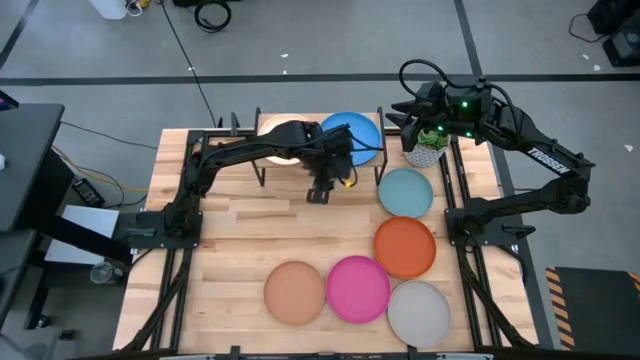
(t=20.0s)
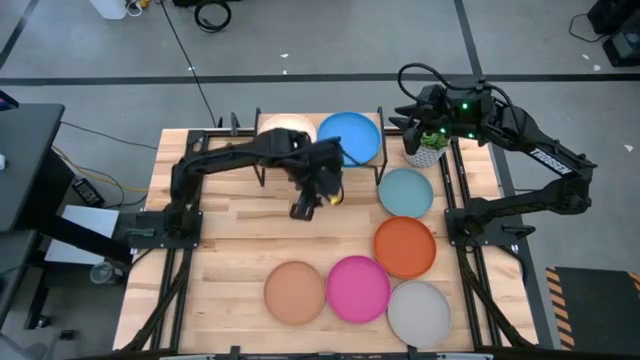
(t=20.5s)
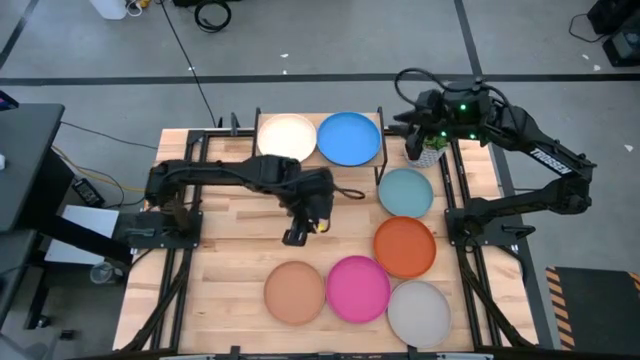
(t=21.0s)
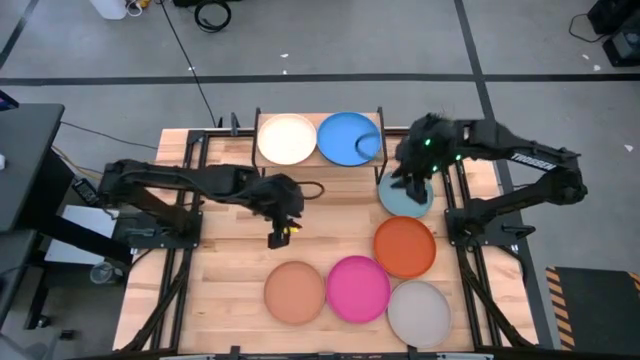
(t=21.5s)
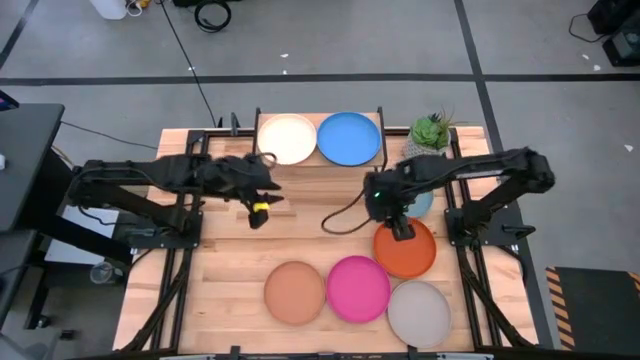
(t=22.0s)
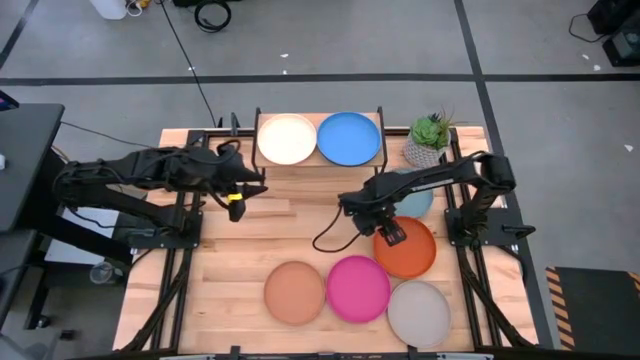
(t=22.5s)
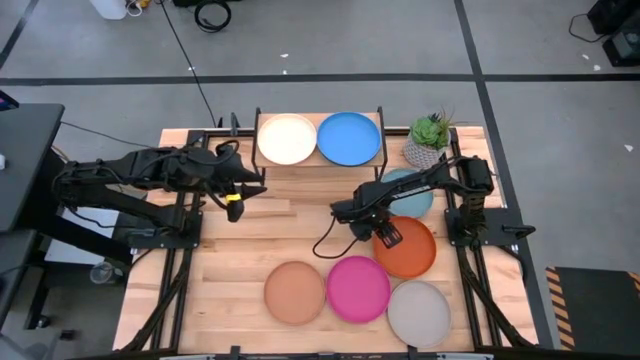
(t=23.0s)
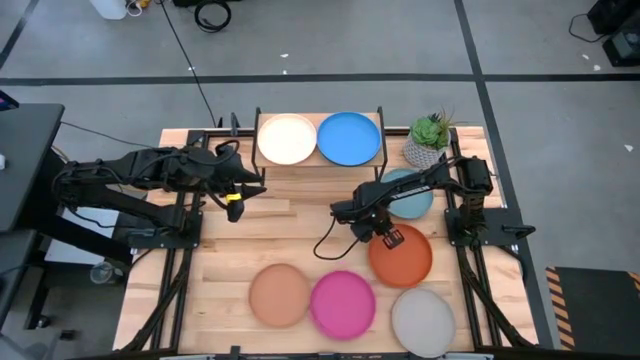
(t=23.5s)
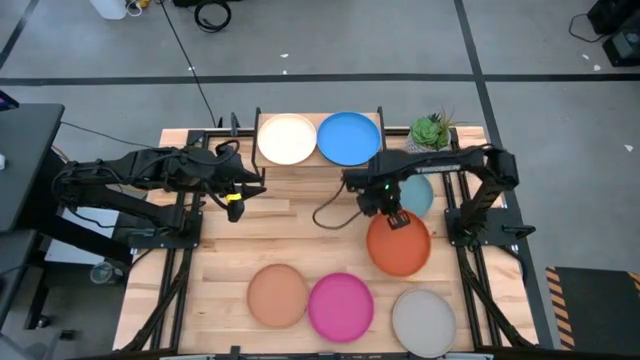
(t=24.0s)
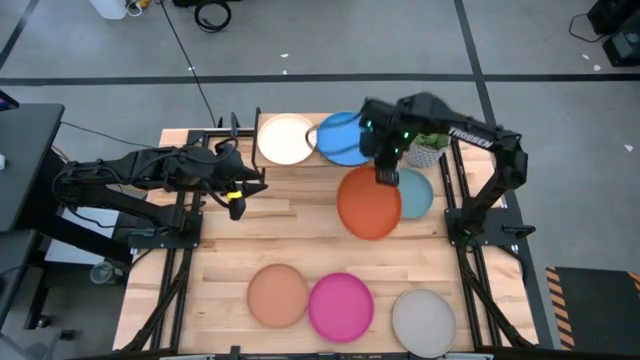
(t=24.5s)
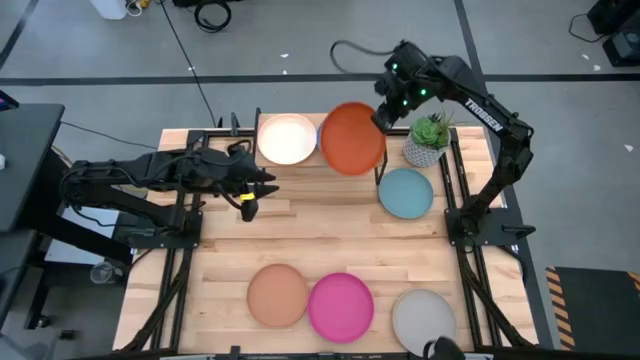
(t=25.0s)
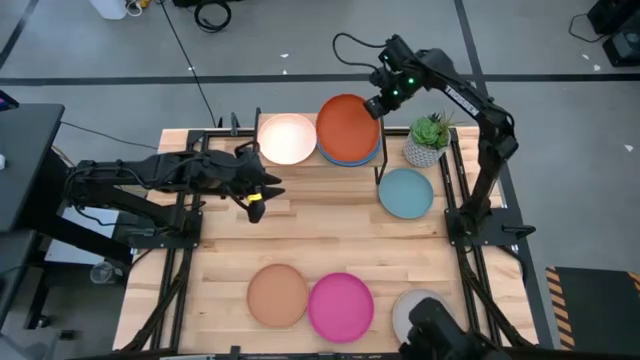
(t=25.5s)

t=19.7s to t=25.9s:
Task: Place and stack plates onto a shelf
Stack the orange plate on top of the blue plate on the shelf

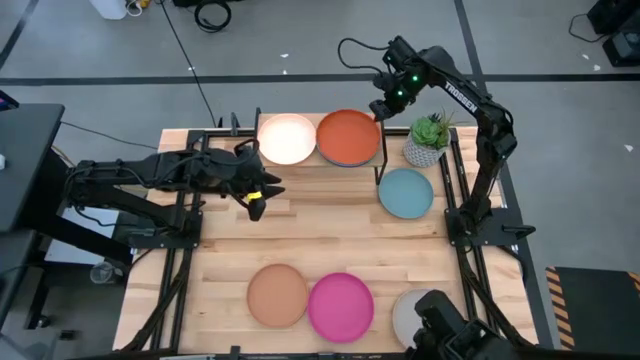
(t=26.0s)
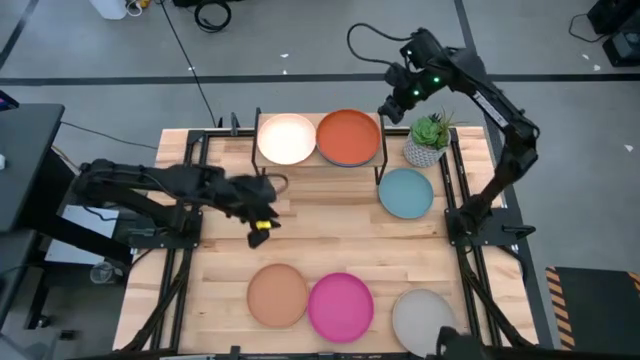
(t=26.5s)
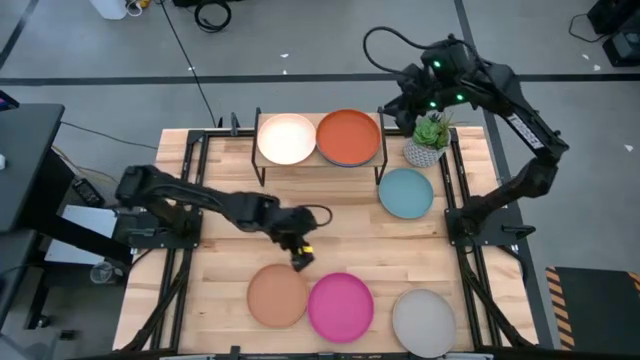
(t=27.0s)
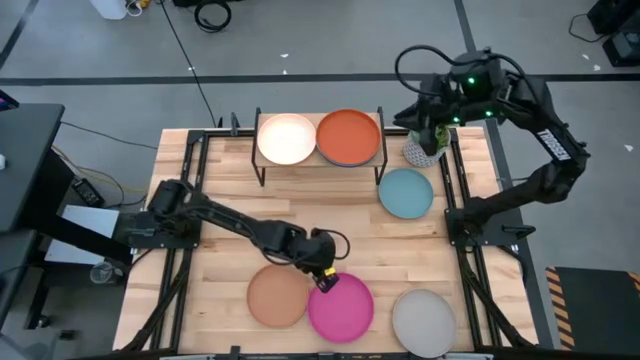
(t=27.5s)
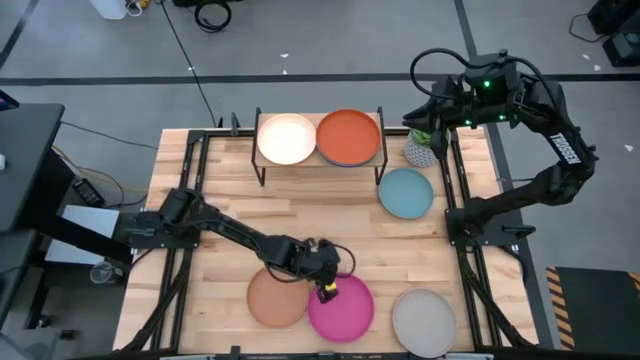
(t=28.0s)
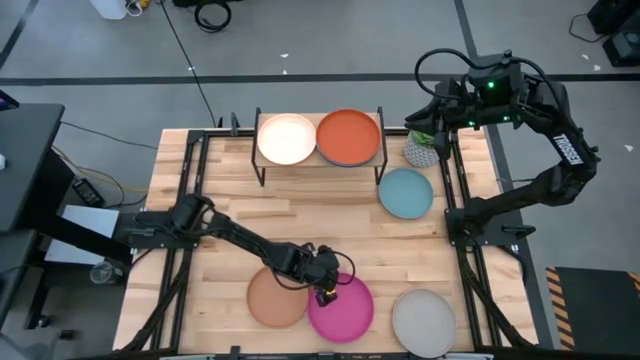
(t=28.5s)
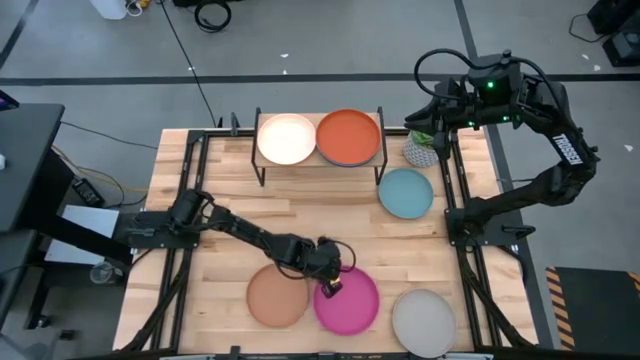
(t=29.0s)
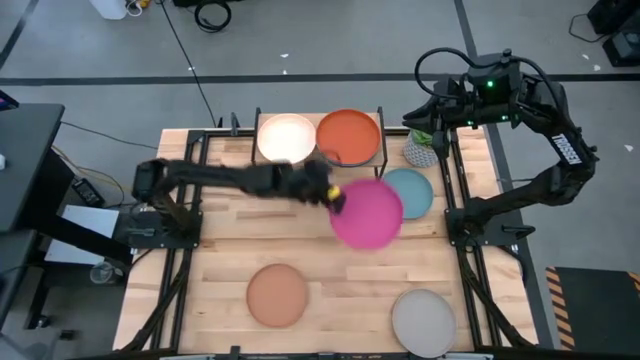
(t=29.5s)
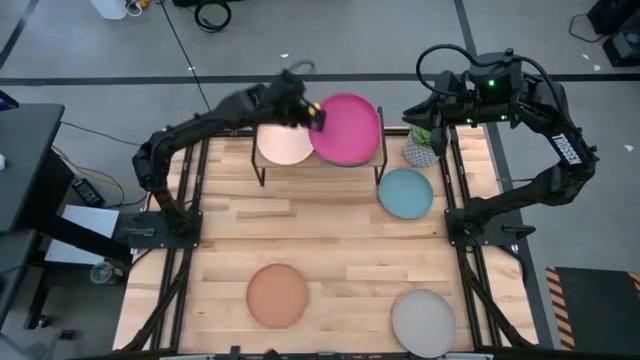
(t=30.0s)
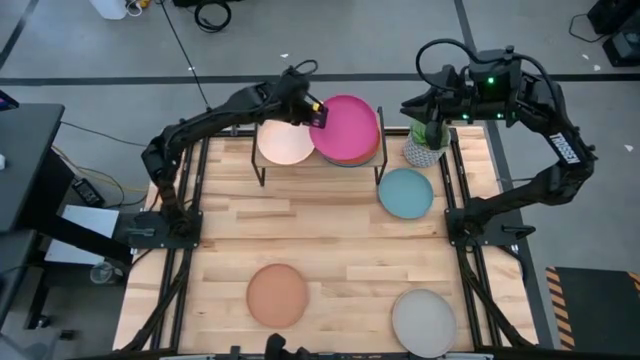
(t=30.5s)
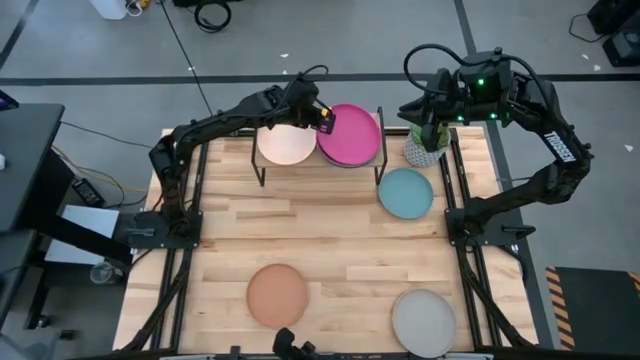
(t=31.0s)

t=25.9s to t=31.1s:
Stack the pink plate on top of the orange plate on the shelf

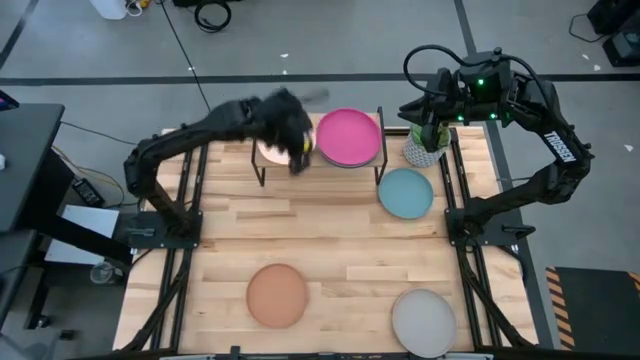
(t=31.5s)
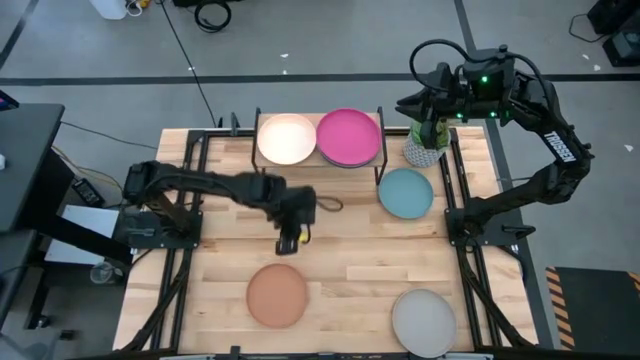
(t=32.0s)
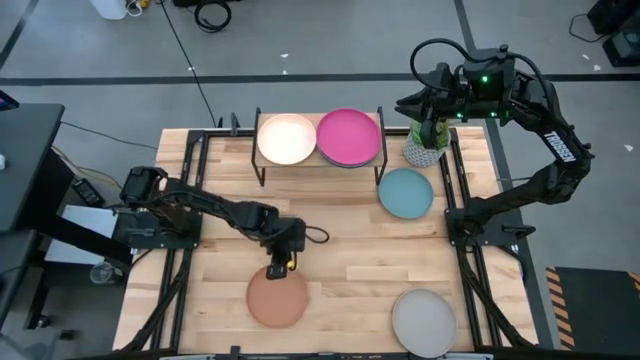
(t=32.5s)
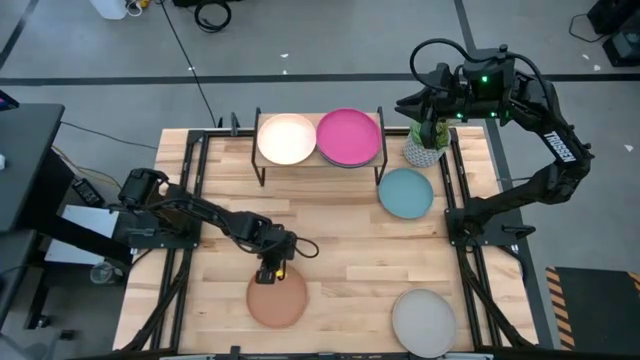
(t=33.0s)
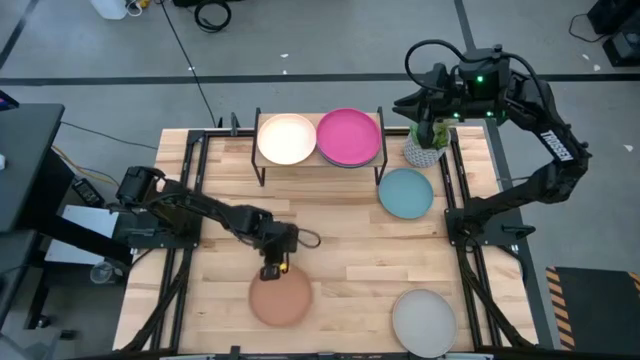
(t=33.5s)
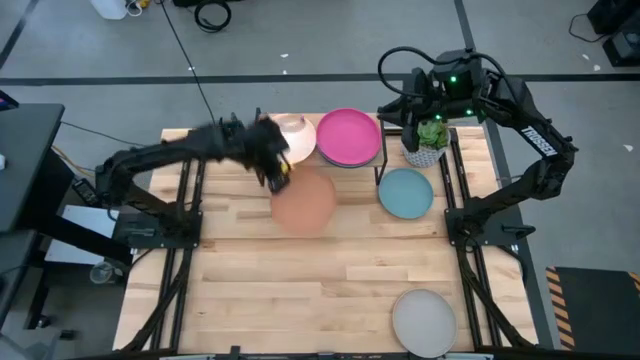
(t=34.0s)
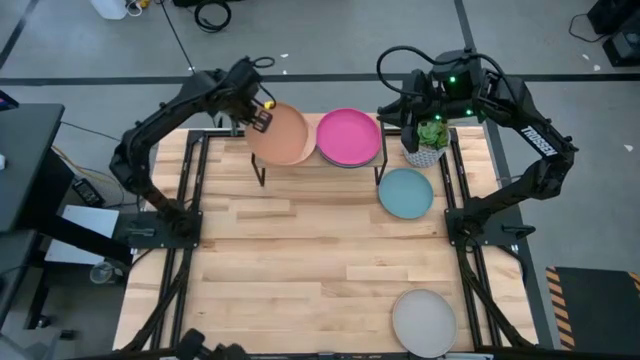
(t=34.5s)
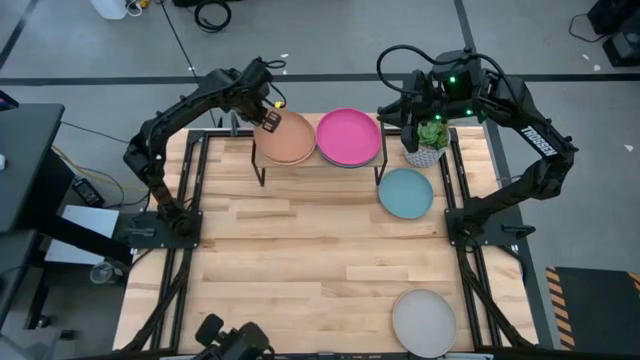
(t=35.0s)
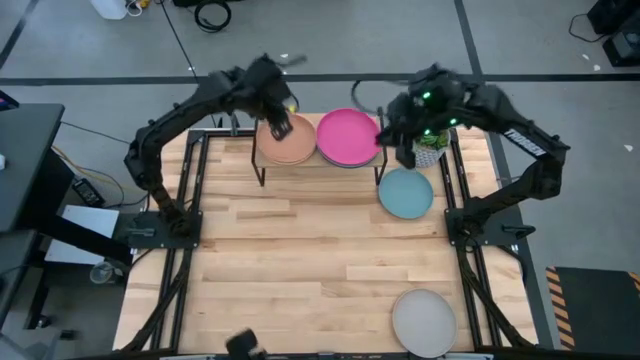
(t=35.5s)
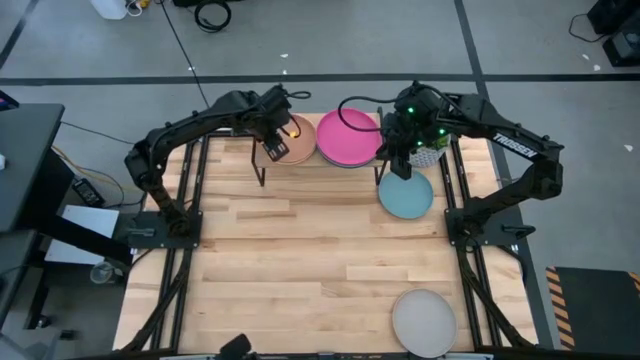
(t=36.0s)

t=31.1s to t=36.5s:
Stack the brown plate on top of the light pink plate on the shelf

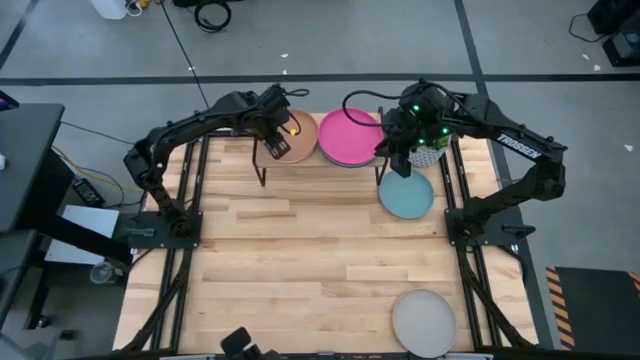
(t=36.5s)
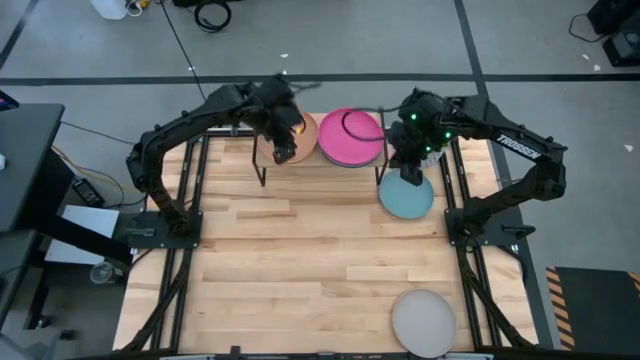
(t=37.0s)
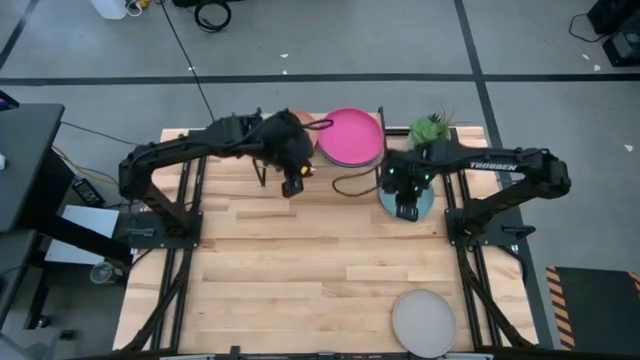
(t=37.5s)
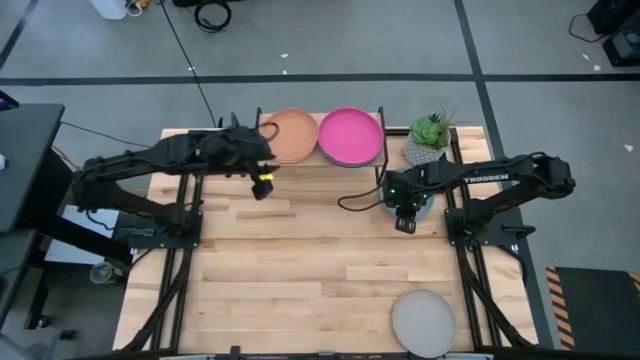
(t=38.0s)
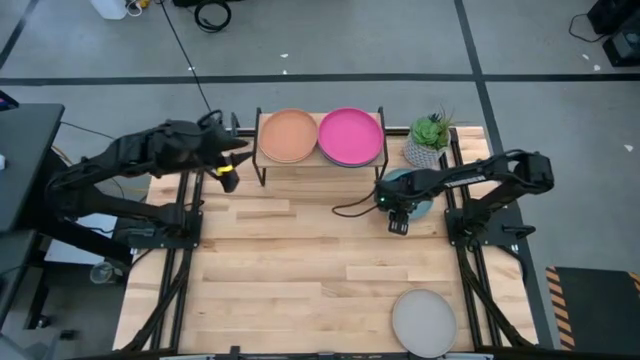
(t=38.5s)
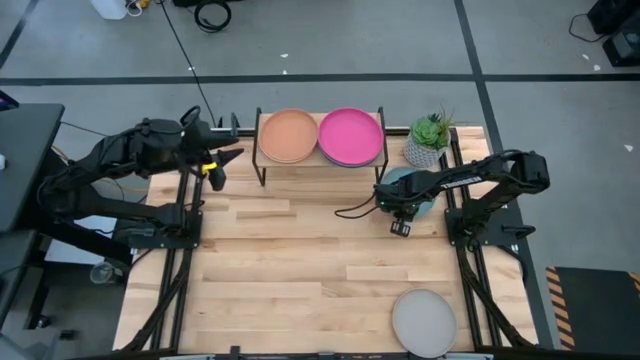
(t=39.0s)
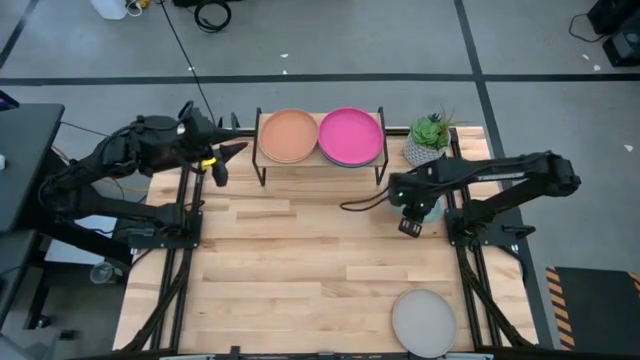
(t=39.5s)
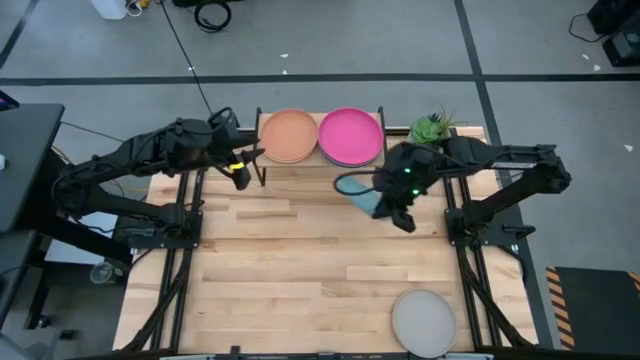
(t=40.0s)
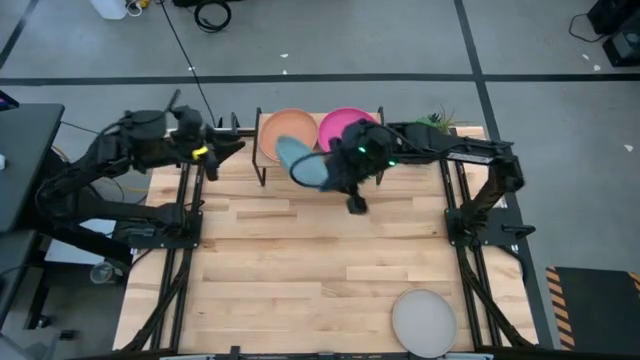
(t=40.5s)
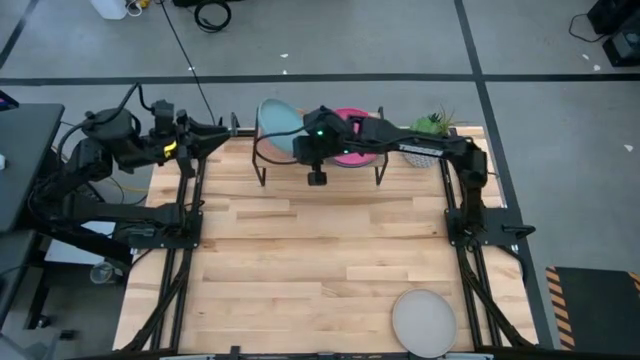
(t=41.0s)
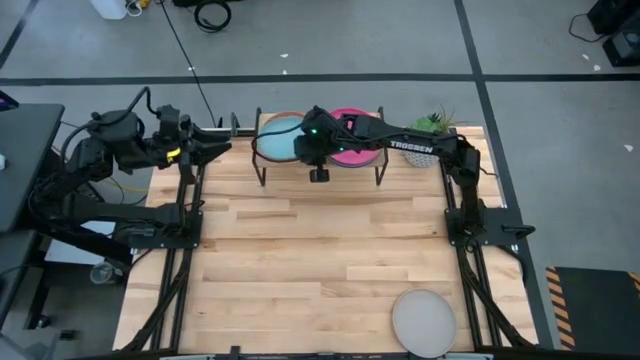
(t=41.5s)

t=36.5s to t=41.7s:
Stack the light blue plate on top of the brown plate on the shelf
